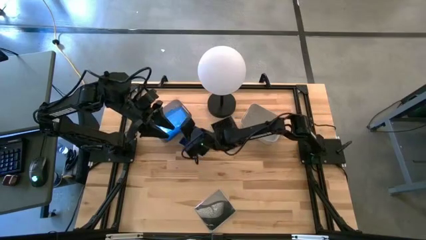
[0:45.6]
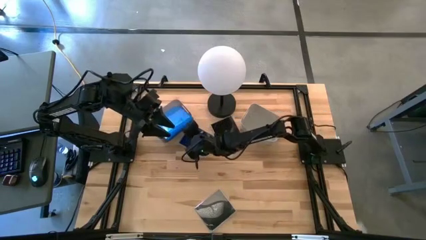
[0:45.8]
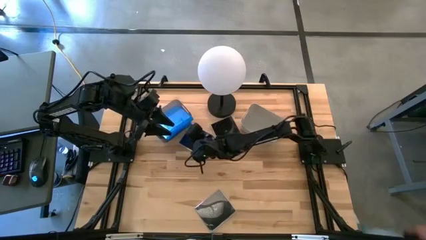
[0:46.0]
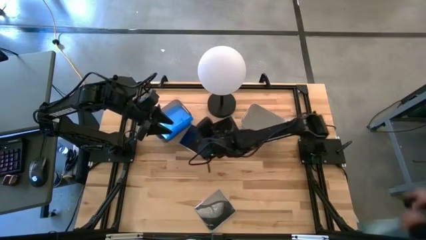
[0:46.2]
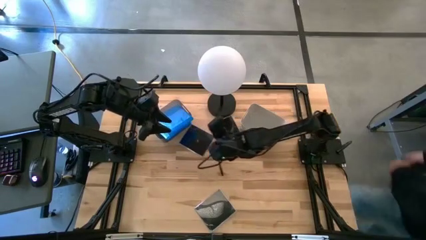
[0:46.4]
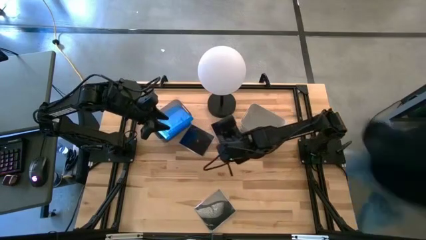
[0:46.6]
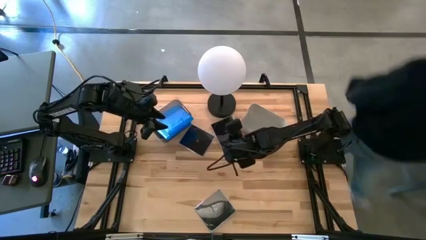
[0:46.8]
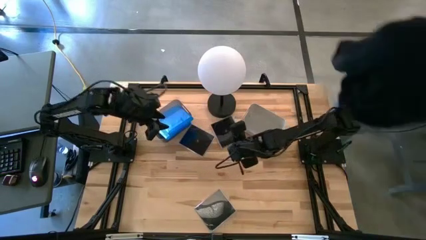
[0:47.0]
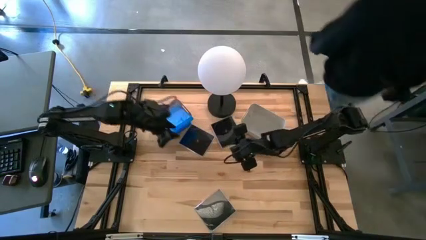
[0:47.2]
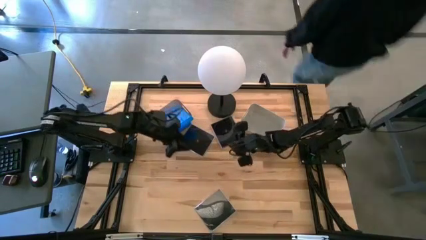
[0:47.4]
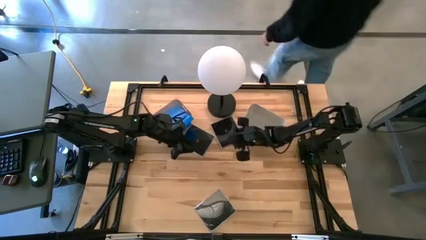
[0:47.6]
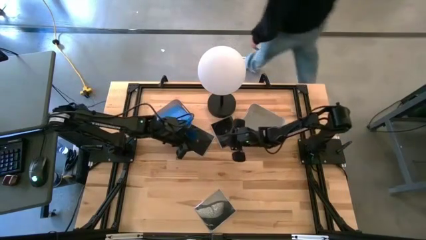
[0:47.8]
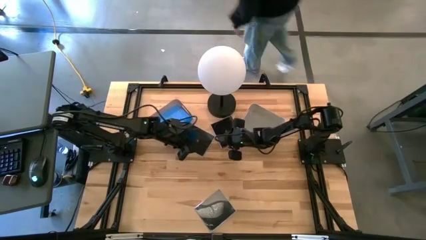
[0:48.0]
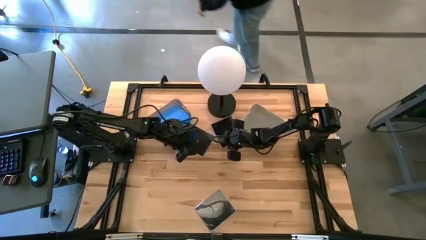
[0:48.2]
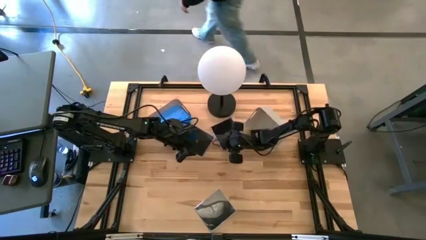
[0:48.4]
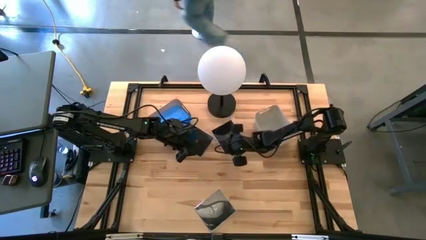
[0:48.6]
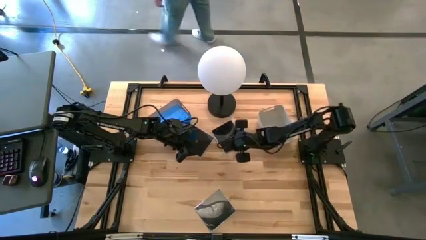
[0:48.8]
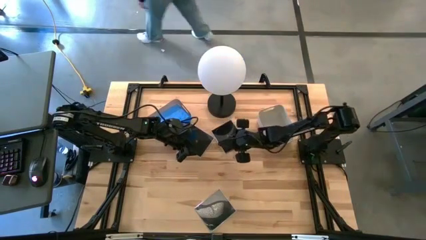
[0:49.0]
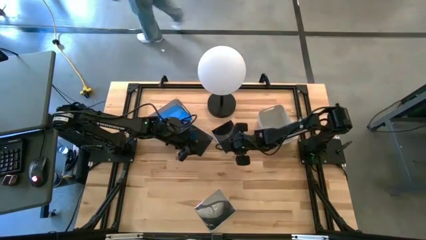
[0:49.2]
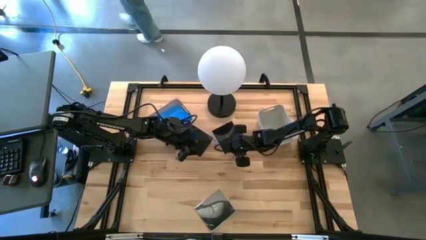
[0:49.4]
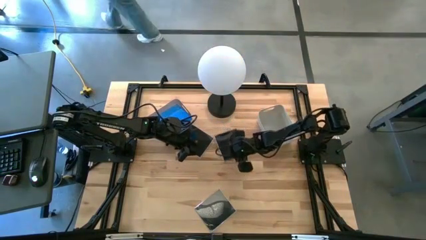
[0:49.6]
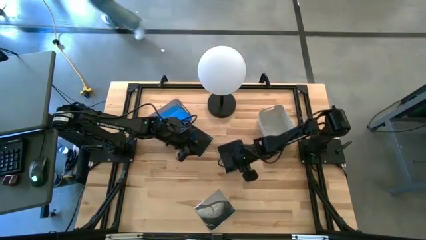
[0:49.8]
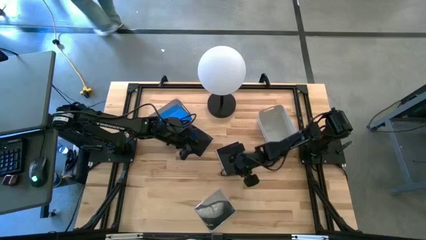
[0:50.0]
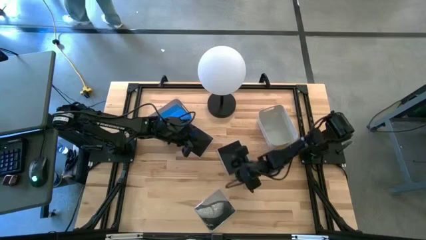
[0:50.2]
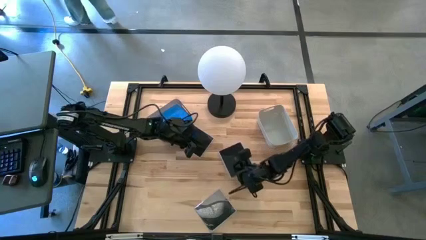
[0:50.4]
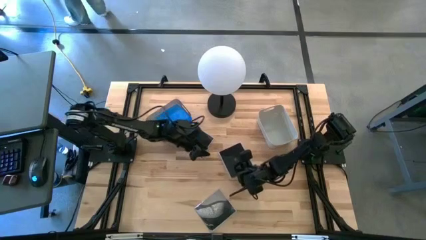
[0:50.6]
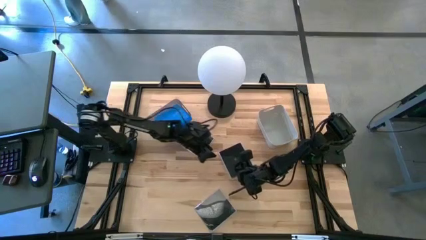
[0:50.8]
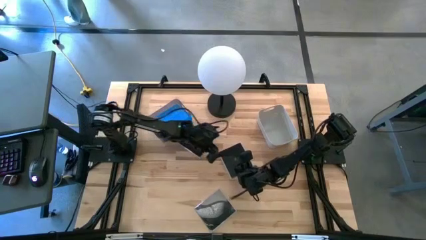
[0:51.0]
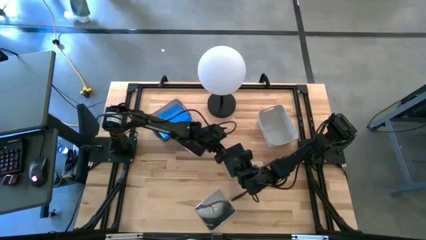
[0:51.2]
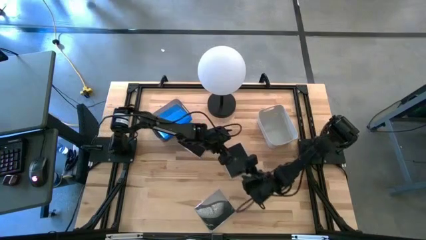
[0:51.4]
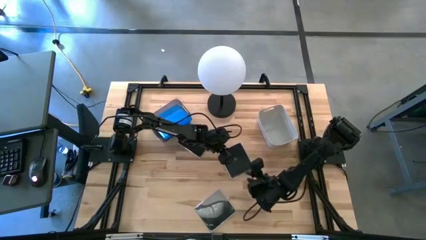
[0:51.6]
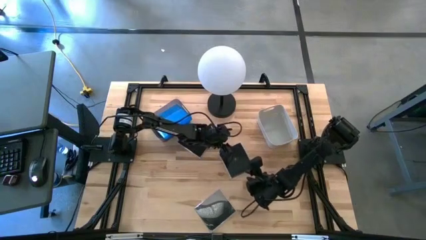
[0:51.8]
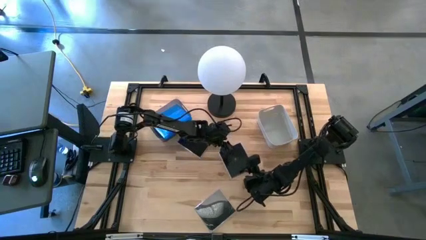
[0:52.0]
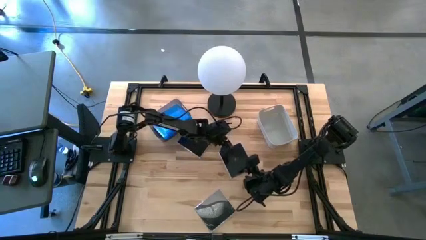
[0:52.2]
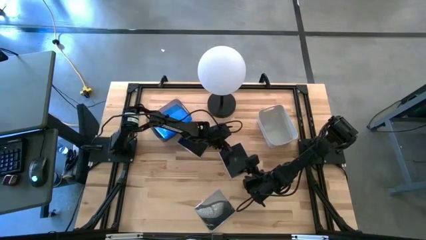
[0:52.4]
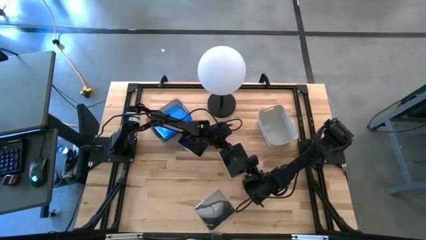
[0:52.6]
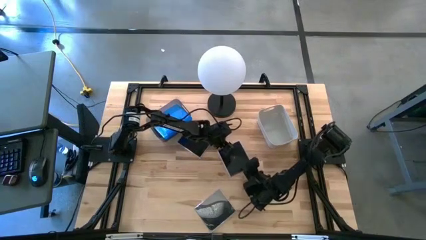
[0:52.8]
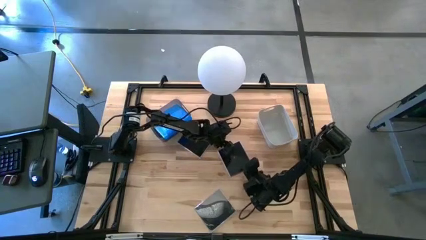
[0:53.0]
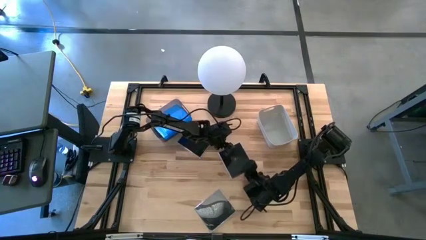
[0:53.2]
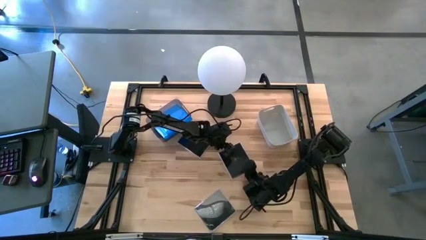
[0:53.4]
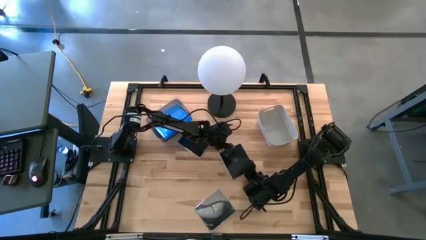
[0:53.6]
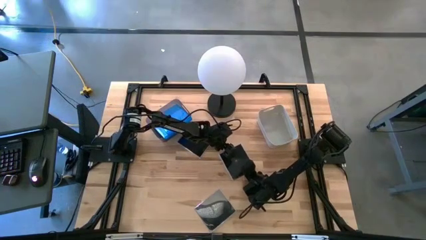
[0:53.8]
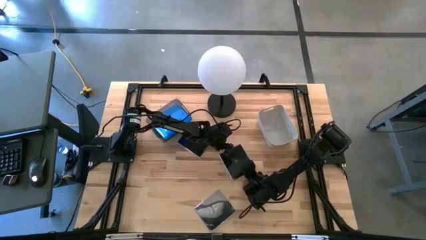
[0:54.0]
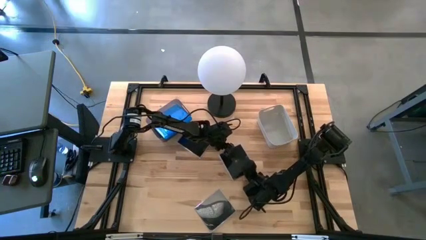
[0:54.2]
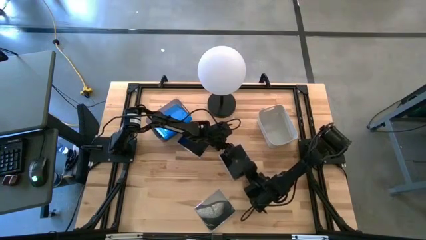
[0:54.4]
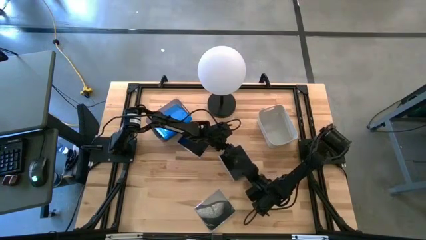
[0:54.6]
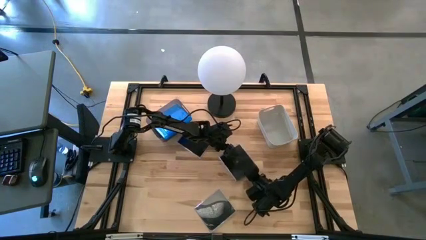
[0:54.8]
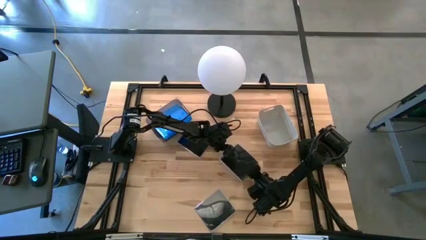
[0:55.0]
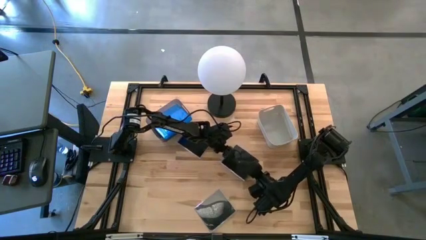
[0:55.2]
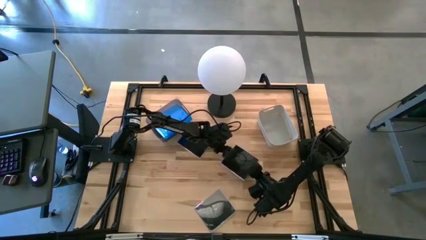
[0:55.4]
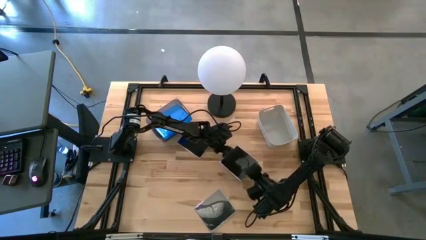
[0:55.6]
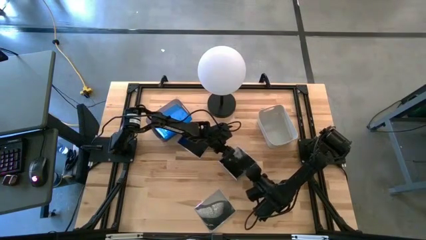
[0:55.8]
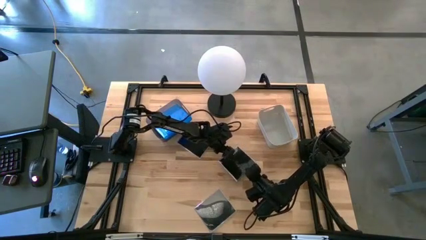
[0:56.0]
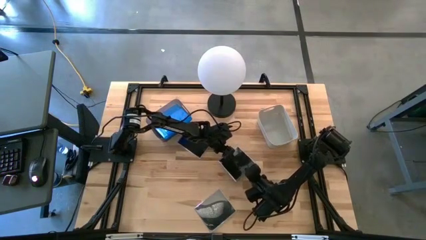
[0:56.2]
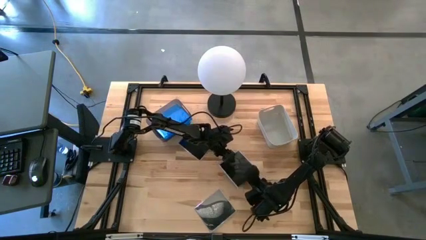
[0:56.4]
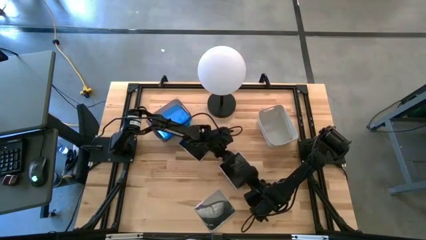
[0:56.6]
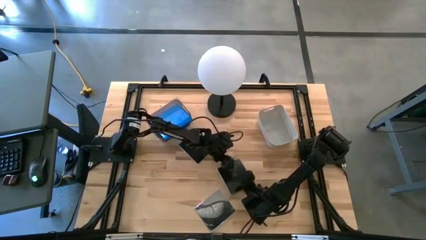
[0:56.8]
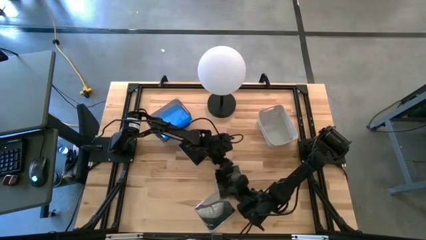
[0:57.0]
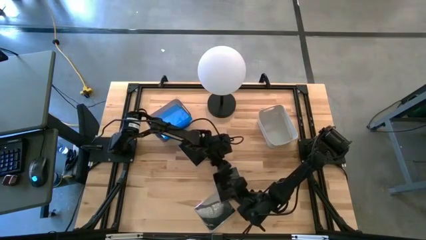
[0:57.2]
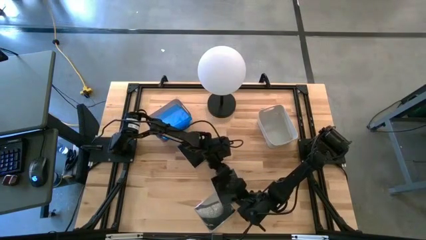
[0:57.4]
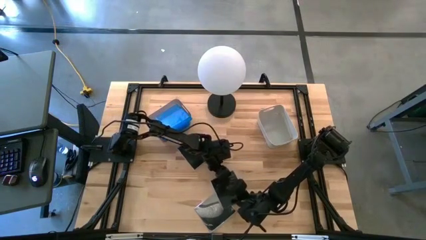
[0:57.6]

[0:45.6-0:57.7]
Task: Pick & place jewel cases by type
Put the top right black CD case into the gray bin

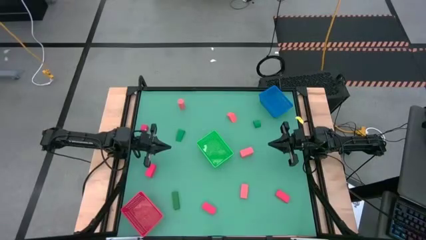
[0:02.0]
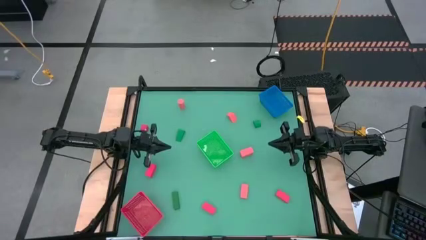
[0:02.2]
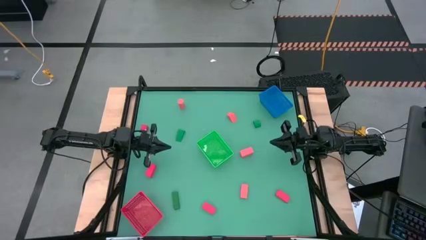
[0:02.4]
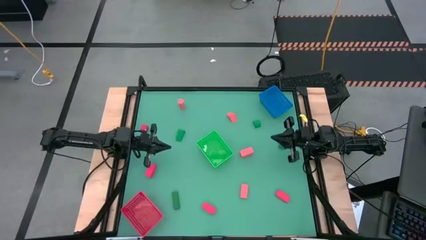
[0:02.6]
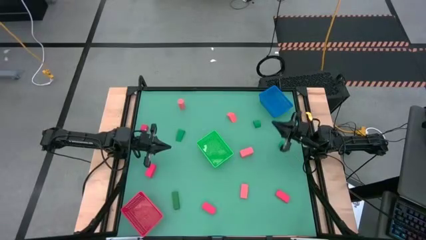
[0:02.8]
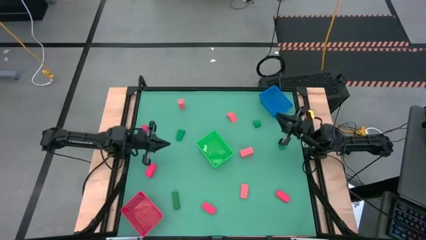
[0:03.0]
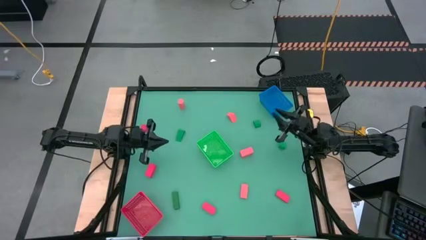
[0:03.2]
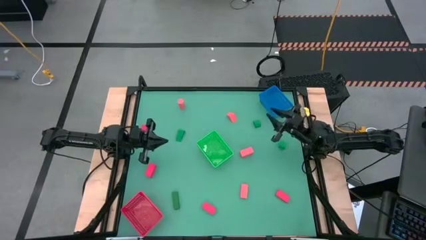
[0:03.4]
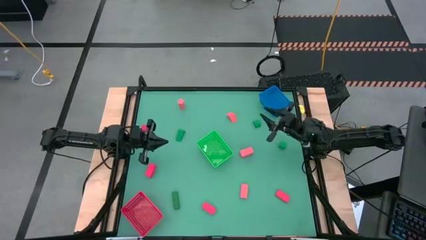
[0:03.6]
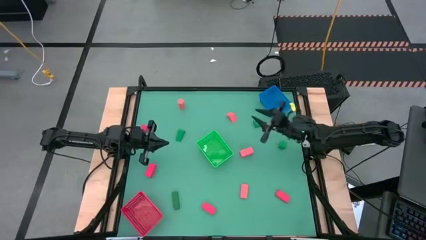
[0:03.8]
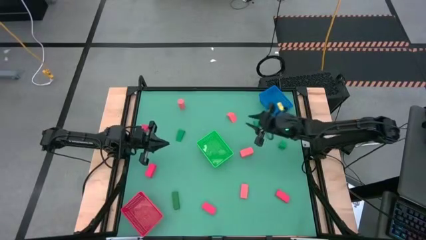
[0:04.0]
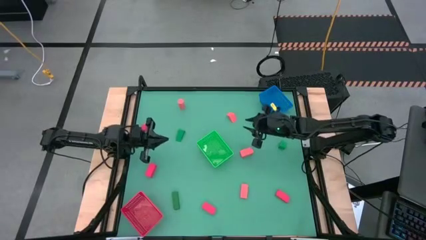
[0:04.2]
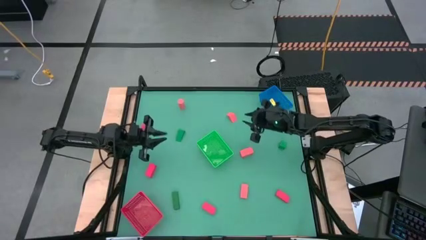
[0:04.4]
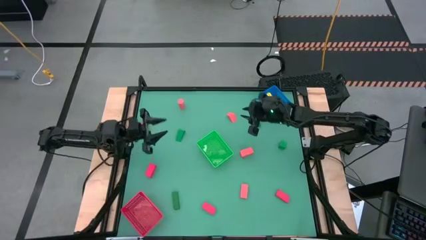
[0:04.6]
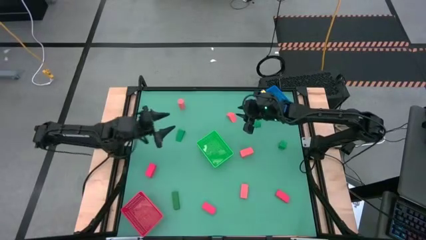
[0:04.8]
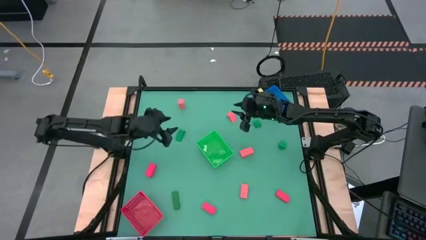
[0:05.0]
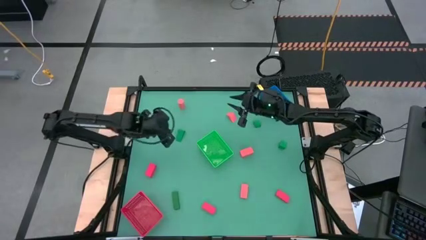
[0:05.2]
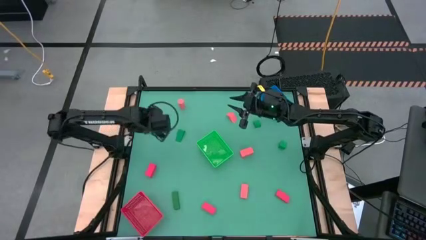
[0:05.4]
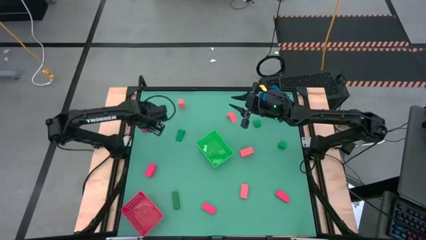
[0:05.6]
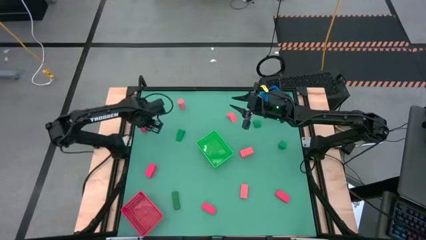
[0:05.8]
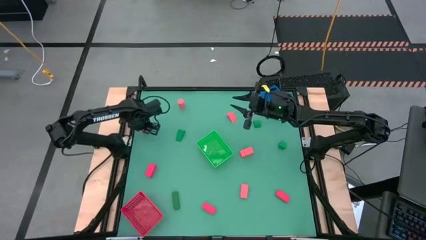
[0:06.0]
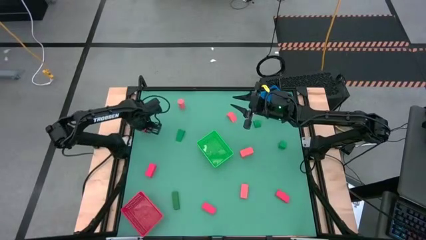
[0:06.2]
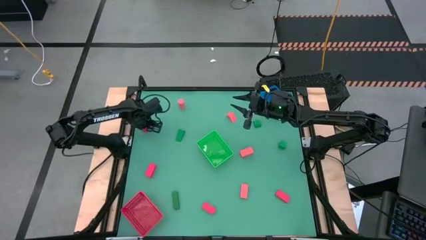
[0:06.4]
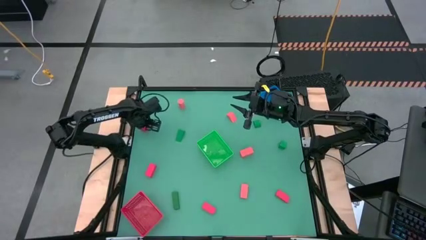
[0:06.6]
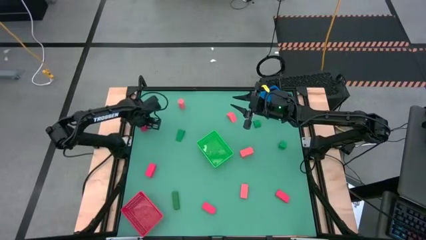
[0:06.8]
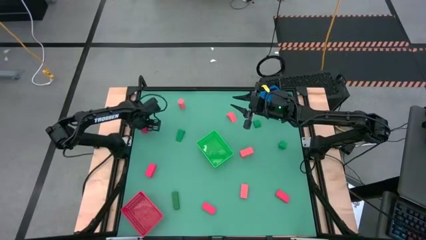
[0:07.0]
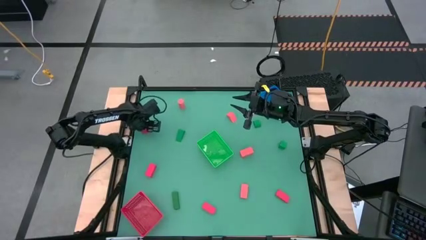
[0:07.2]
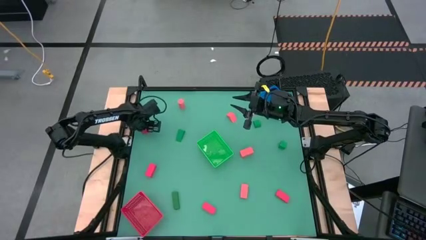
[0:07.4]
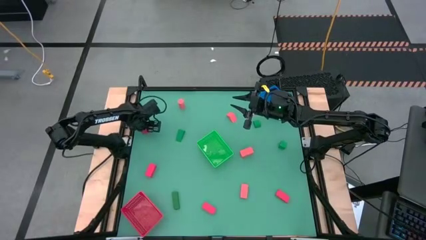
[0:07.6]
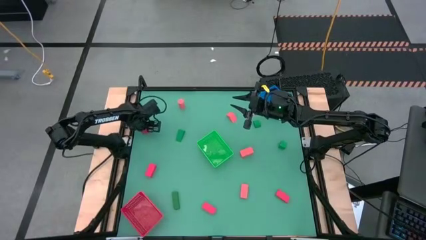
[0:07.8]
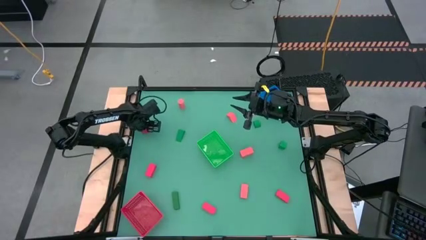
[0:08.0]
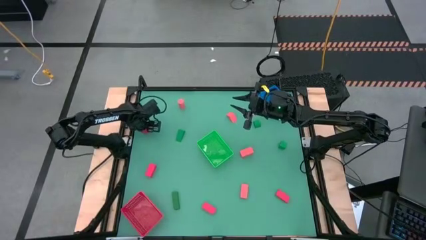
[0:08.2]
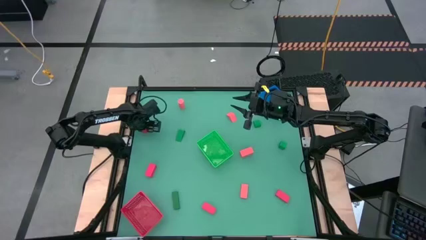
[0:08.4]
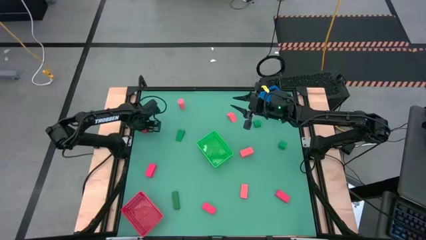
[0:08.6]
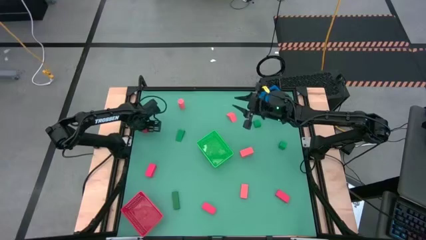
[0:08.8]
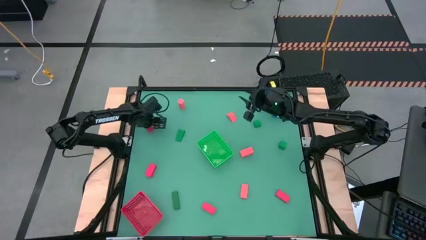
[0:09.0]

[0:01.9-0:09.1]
Task: Sort & place blocks by color
Adjust the light pink block
